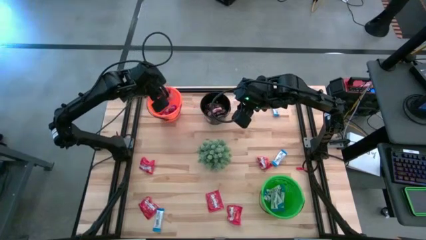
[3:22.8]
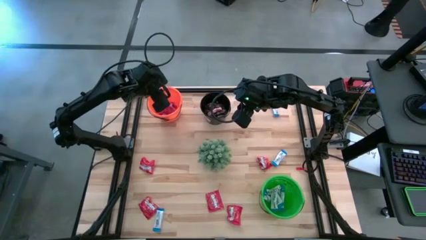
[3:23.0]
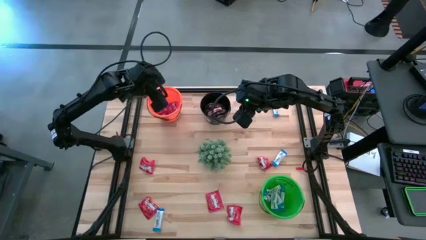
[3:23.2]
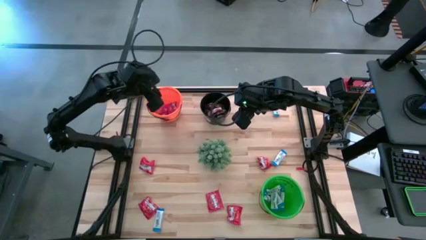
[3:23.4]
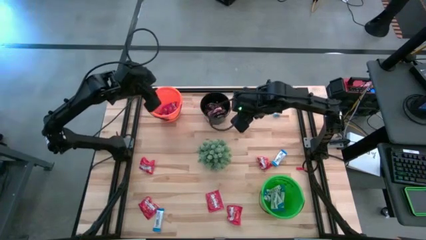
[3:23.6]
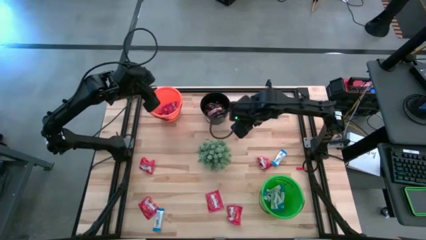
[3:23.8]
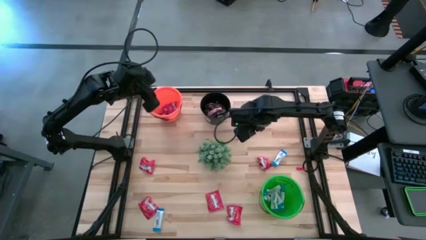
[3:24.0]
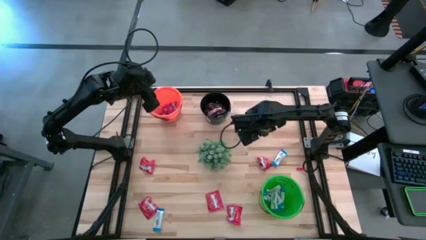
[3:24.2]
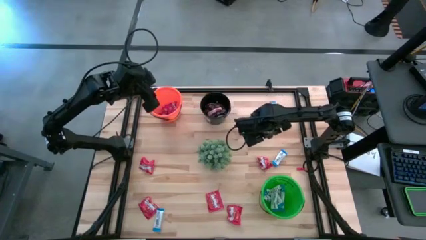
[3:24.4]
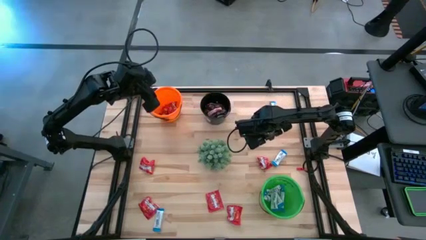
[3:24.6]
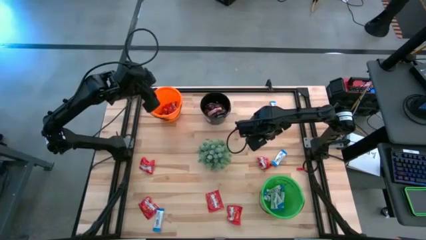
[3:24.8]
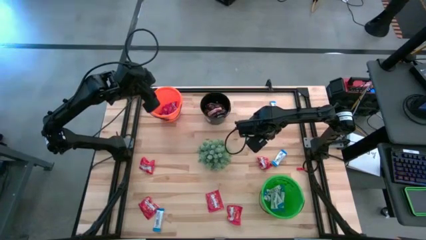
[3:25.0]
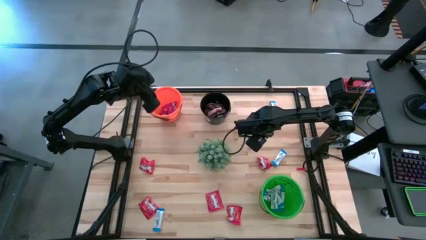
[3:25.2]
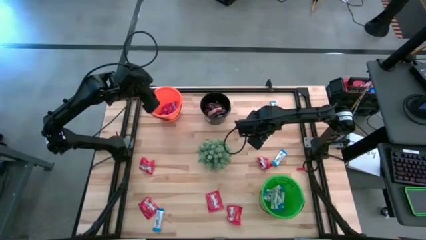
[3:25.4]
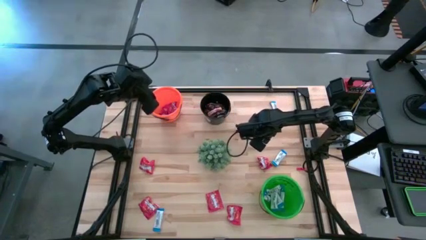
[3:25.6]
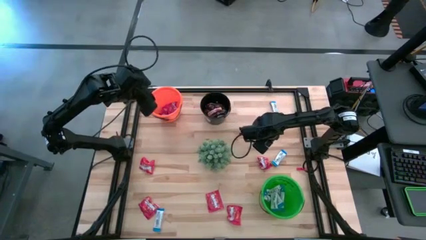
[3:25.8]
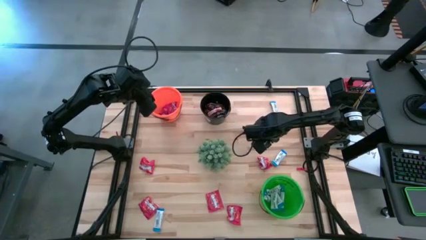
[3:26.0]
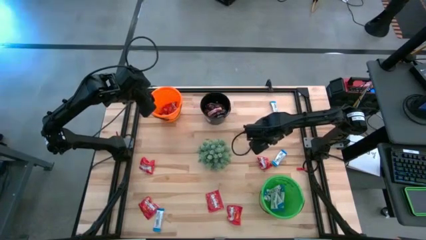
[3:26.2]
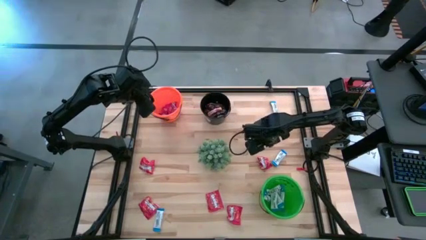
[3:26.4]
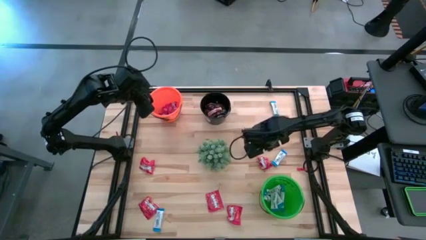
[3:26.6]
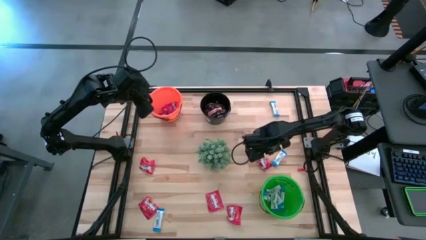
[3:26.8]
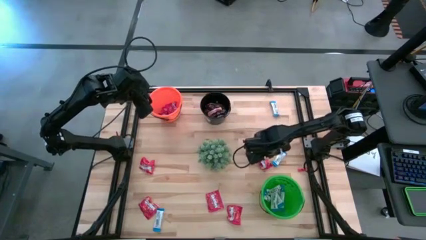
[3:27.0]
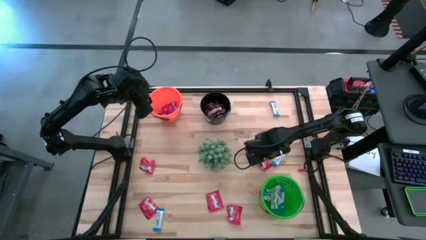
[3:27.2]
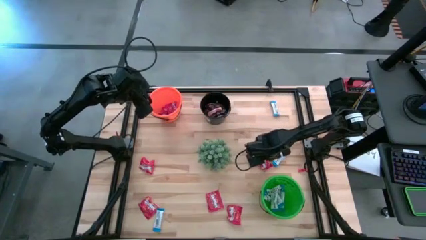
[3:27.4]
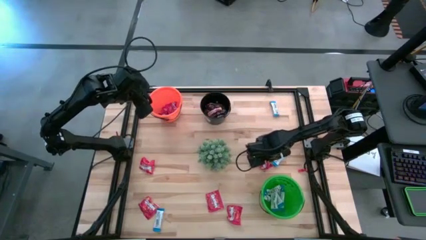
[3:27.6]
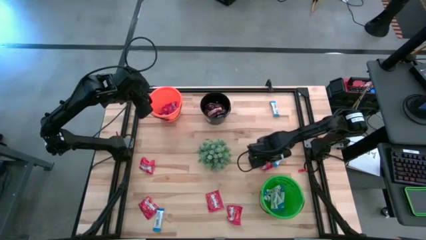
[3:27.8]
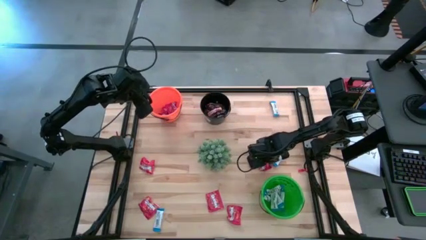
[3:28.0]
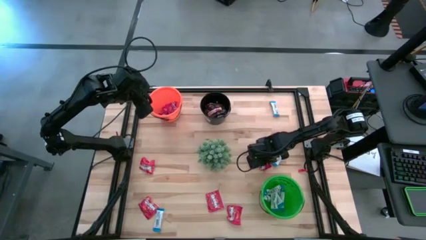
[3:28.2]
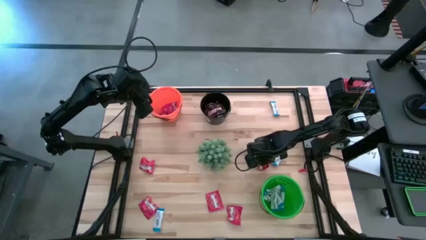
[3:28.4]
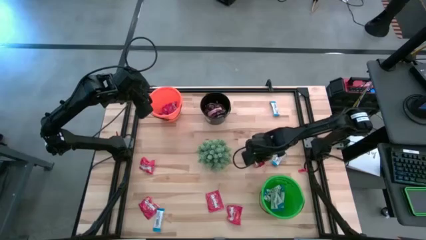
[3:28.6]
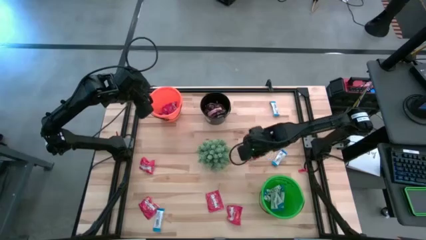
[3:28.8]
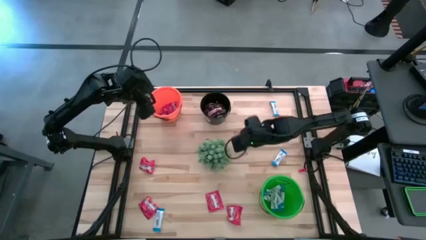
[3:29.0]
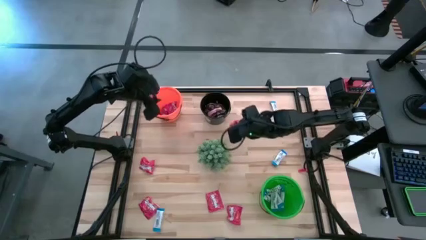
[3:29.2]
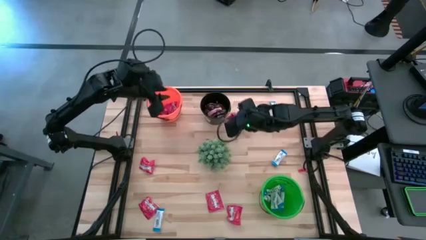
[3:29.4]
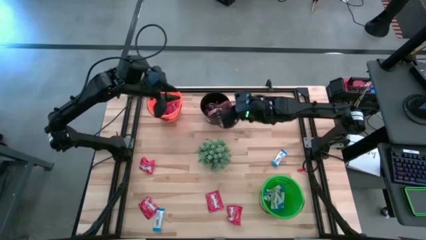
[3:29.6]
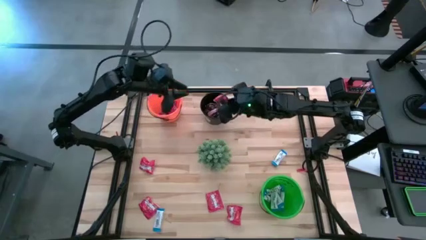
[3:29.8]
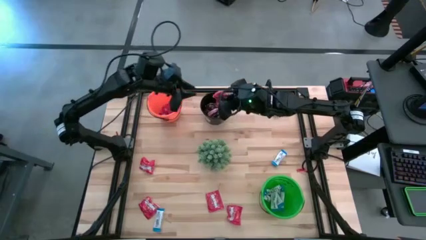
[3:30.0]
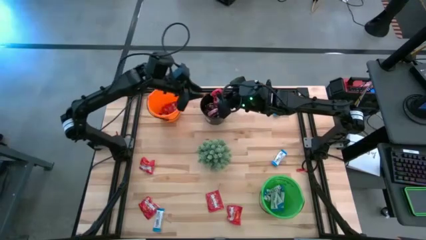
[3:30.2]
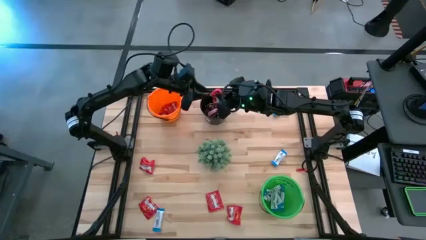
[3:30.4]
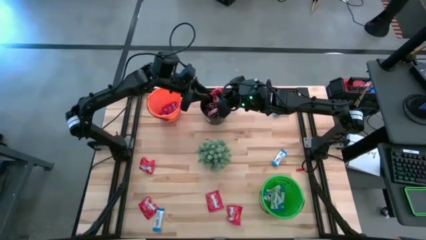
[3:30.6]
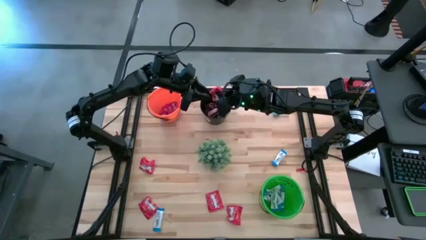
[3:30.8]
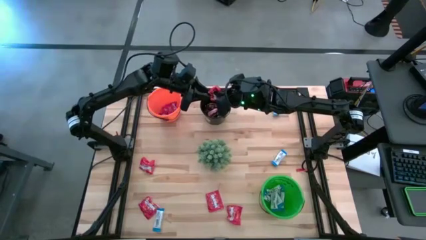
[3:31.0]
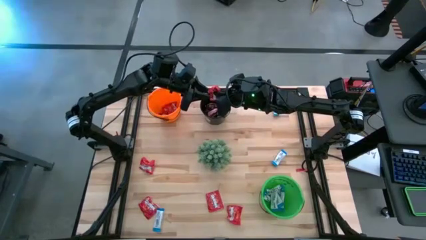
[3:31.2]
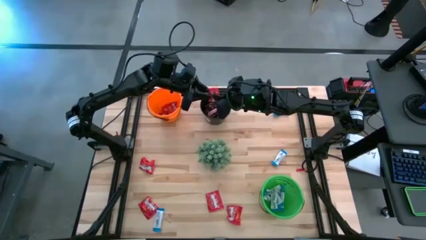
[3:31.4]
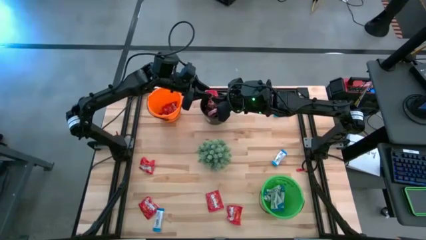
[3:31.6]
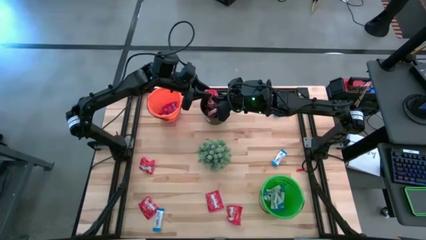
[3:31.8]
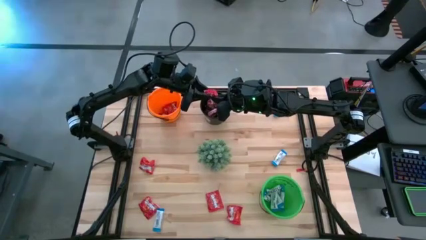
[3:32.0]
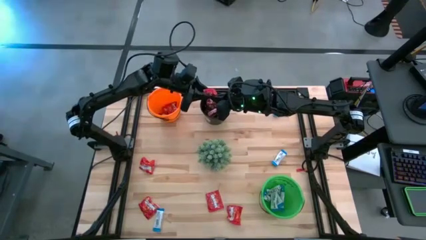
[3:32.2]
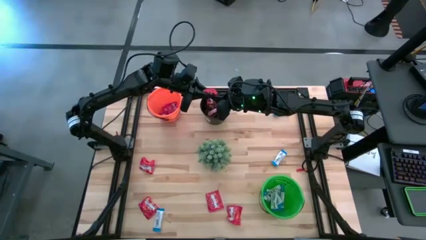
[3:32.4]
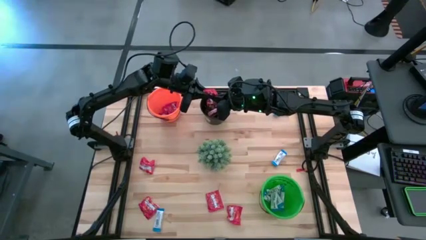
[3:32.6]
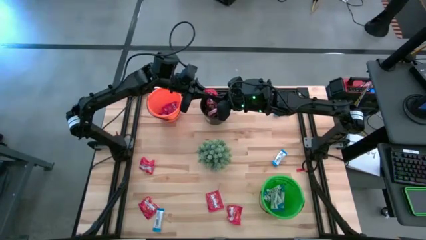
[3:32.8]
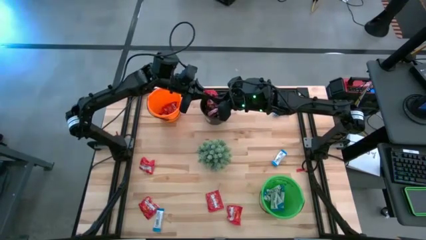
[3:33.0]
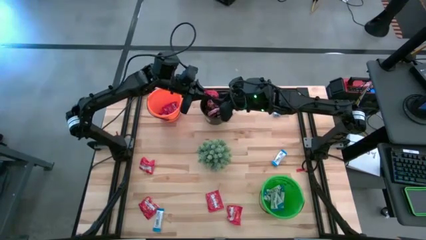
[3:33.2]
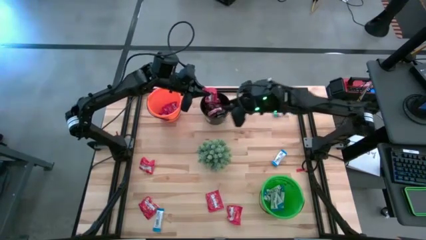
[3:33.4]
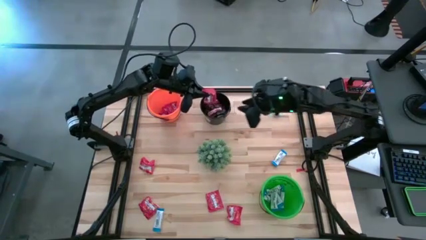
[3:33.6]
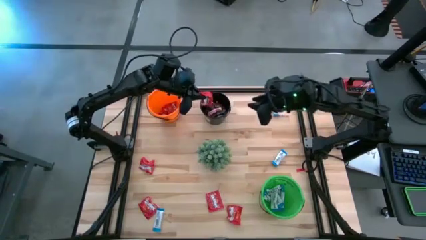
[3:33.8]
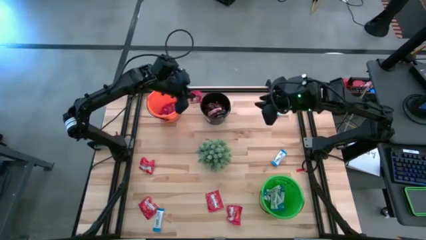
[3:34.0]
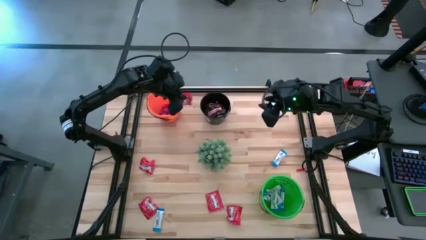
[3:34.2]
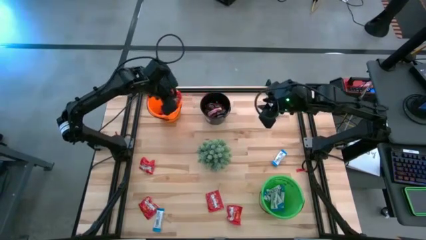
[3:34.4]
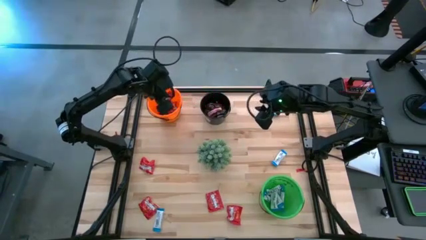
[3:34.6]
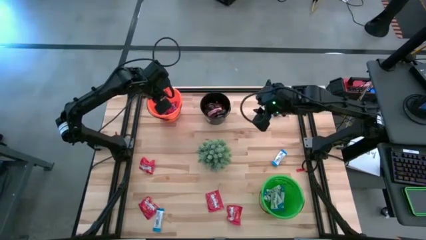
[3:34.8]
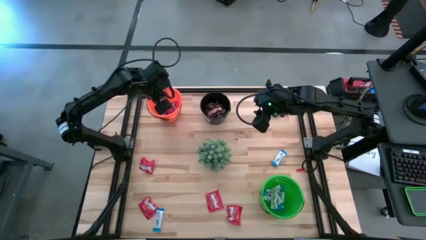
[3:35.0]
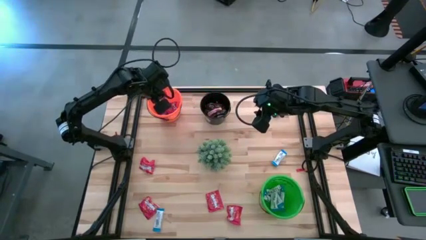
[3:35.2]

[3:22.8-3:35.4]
Task: Sort candy
Put the red candy into the orange bucket
